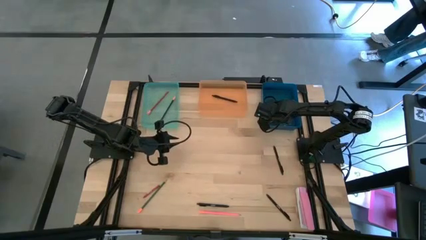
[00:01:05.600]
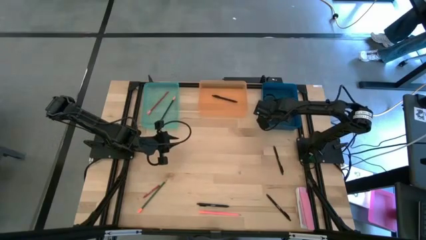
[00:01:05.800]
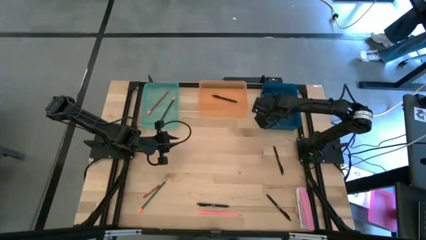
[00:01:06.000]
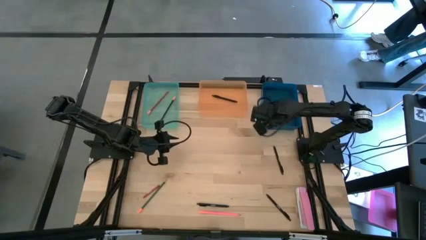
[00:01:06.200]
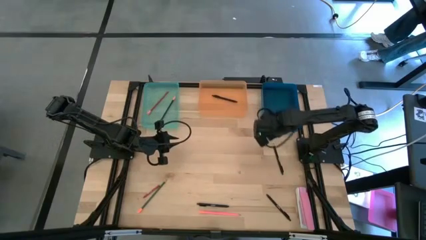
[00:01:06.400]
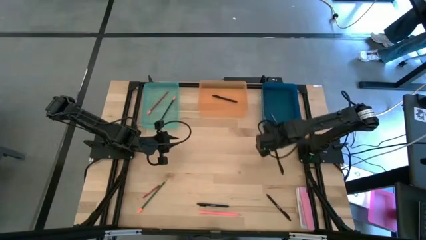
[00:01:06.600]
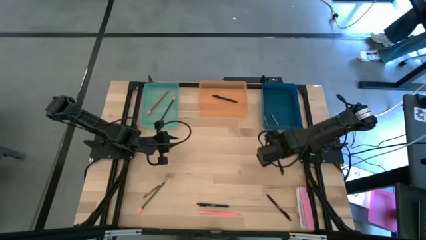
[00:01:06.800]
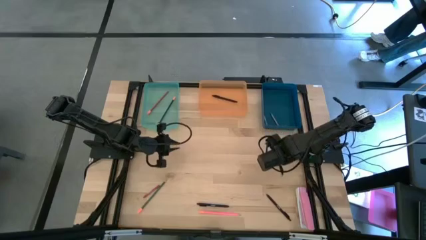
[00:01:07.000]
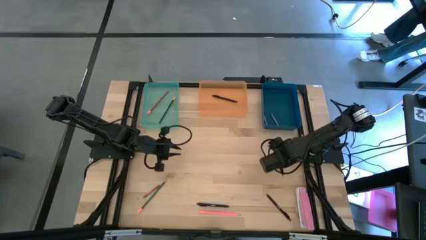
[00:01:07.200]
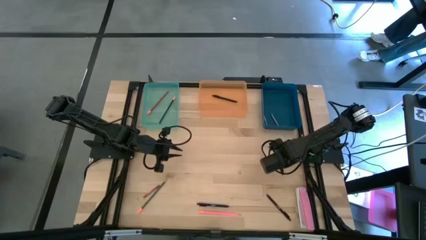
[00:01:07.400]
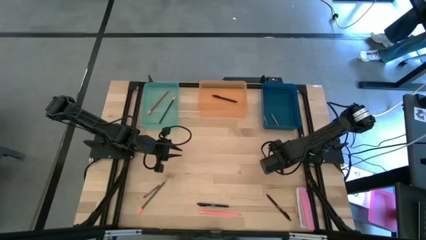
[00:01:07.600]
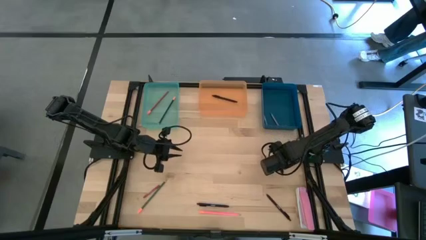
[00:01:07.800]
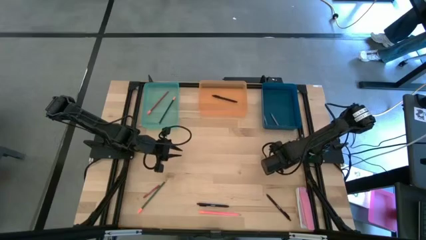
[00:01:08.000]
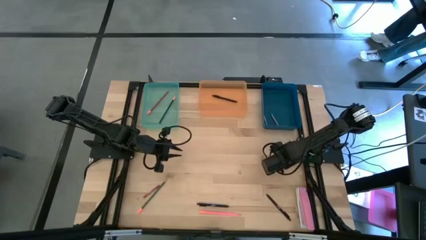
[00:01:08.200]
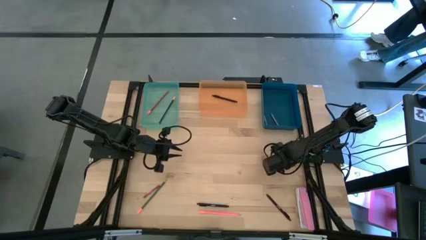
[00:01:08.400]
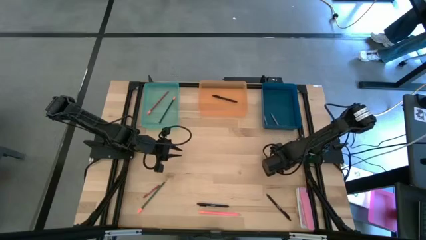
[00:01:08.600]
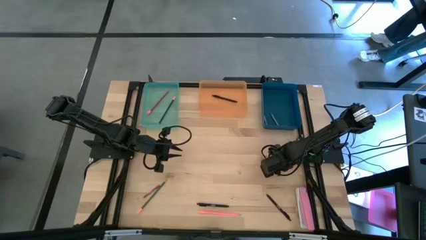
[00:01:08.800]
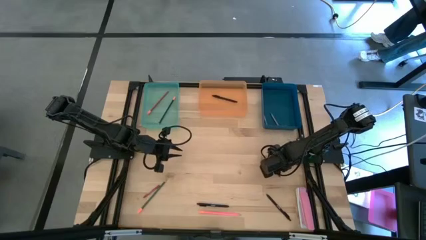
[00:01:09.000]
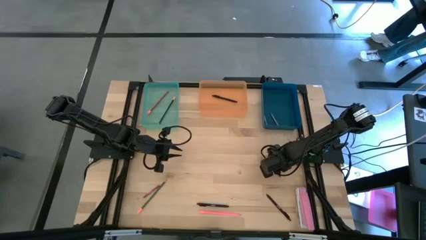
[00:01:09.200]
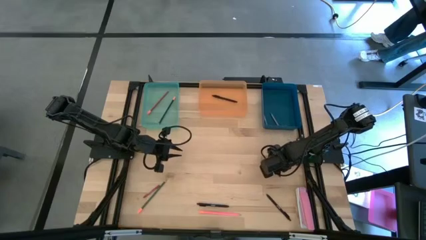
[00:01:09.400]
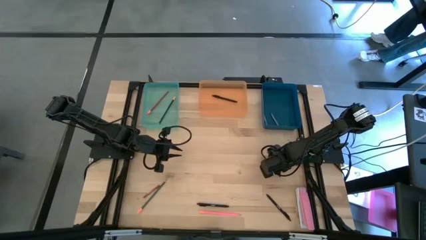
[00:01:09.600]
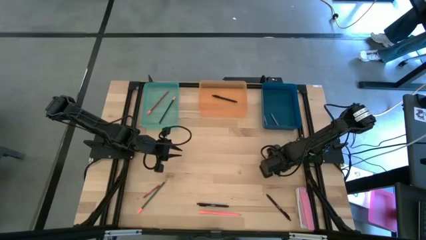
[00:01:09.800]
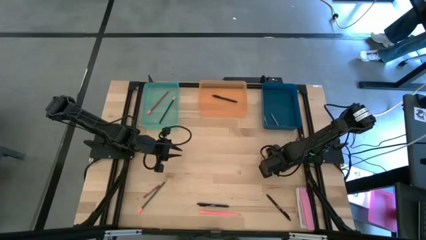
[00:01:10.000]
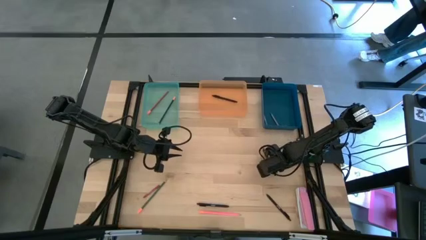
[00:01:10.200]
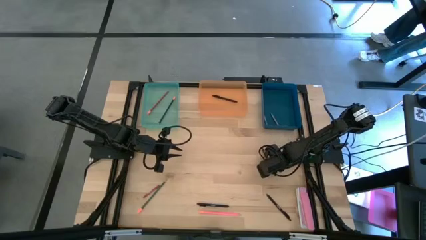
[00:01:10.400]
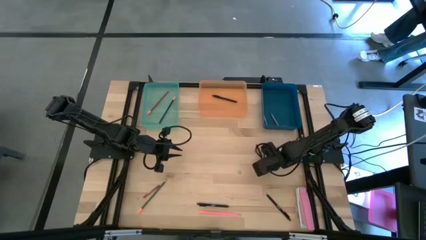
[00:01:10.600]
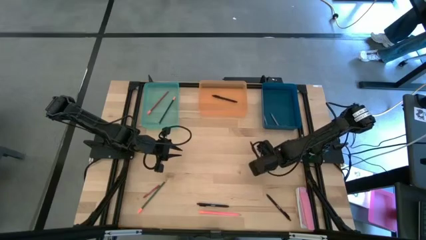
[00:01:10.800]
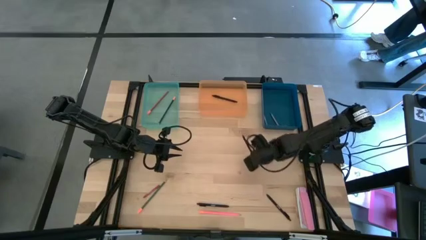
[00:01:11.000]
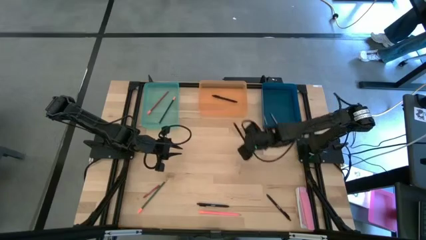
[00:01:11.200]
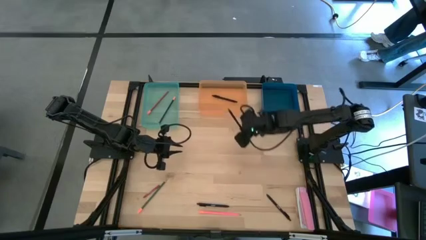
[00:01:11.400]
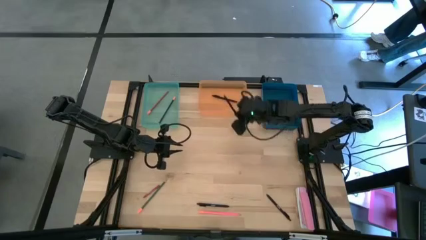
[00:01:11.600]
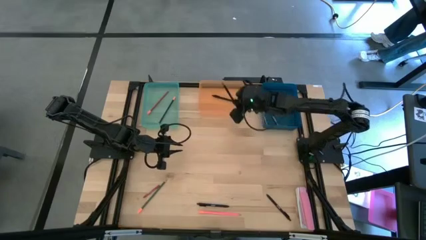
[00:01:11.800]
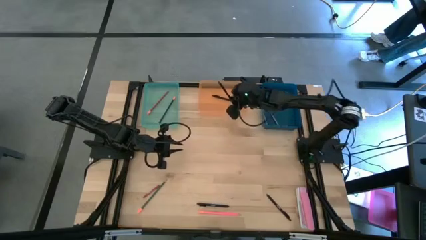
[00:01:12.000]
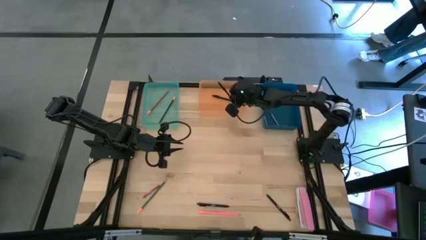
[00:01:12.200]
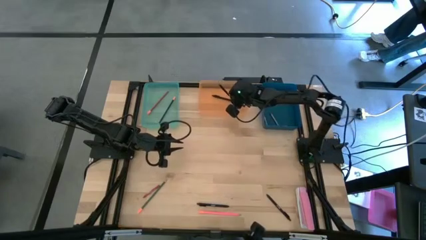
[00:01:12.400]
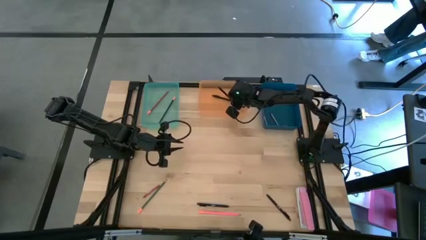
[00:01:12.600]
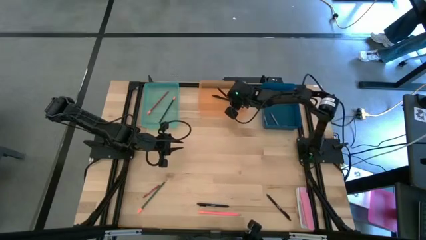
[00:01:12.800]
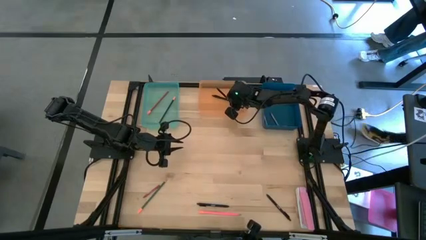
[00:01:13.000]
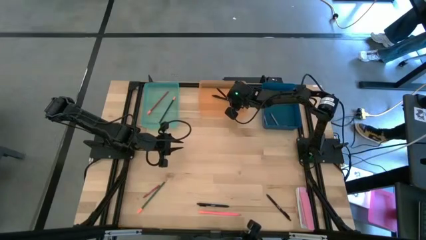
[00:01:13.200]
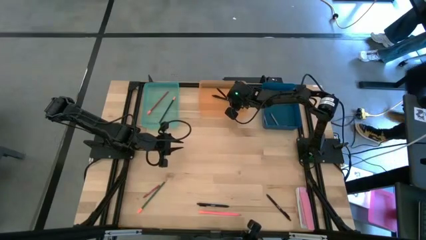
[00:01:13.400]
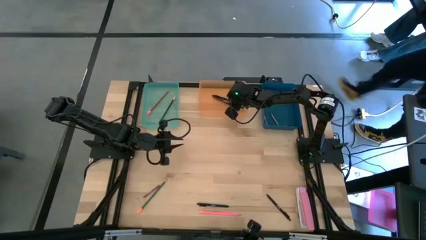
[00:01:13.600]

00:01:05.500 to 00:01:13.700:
Task: Sort crayons/erasers/pens/pencils in bins
Put the black pen into the orange bin

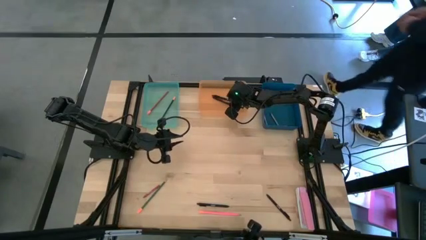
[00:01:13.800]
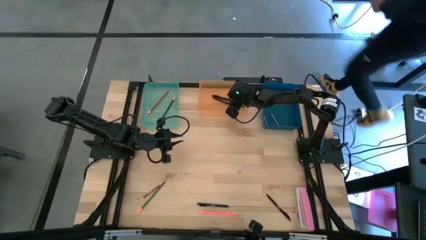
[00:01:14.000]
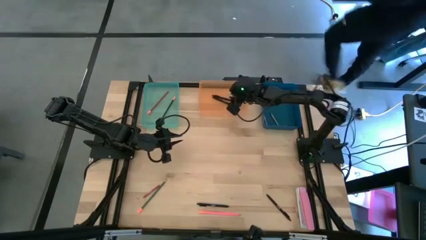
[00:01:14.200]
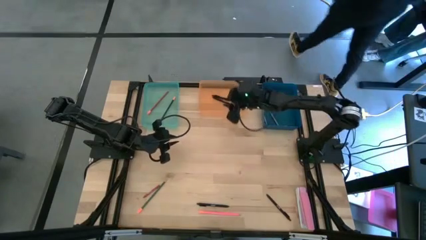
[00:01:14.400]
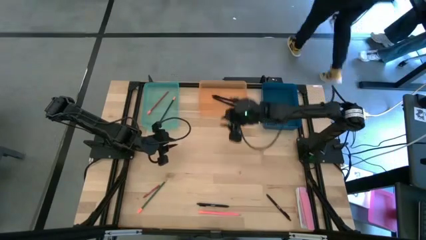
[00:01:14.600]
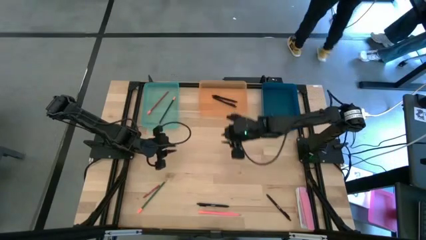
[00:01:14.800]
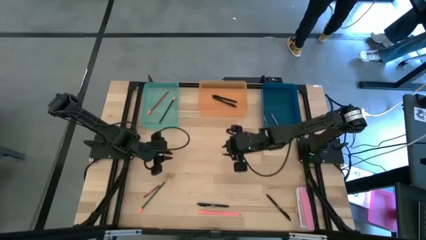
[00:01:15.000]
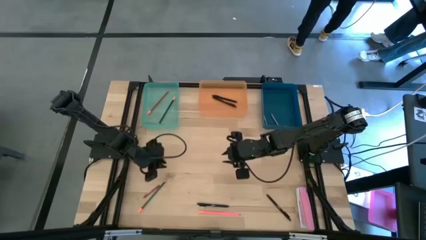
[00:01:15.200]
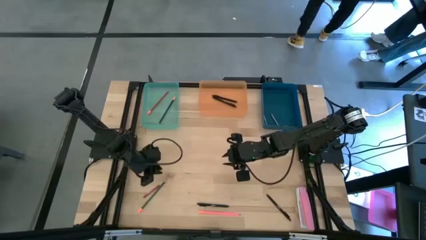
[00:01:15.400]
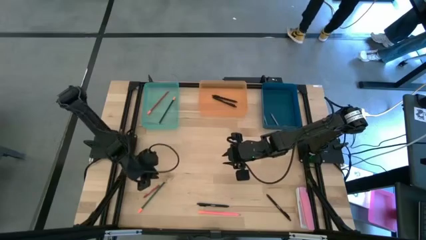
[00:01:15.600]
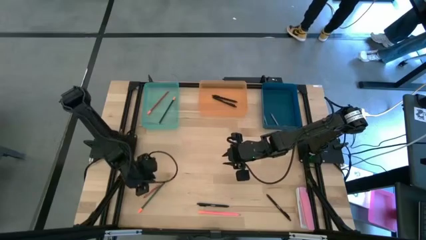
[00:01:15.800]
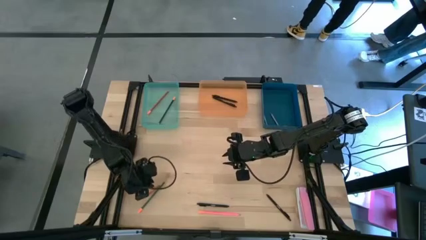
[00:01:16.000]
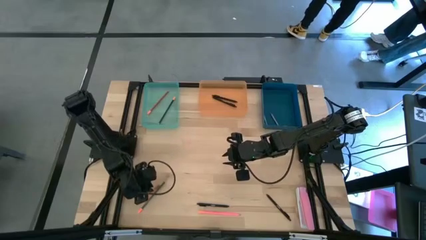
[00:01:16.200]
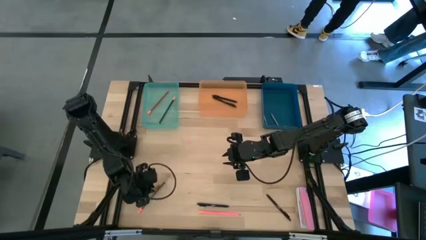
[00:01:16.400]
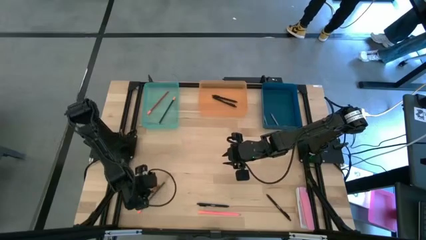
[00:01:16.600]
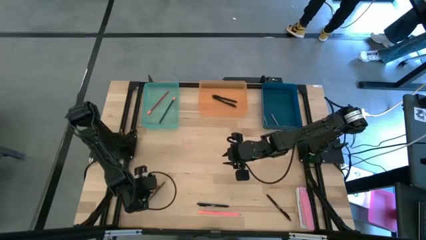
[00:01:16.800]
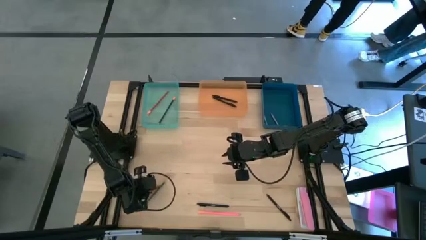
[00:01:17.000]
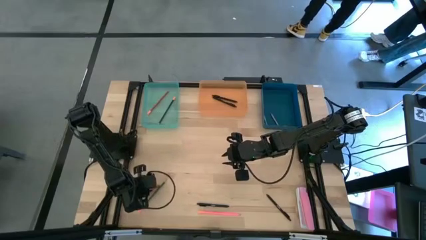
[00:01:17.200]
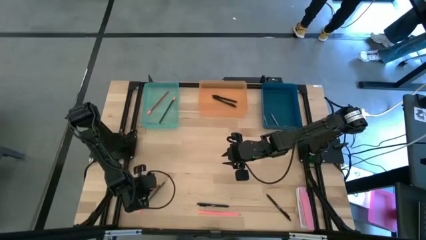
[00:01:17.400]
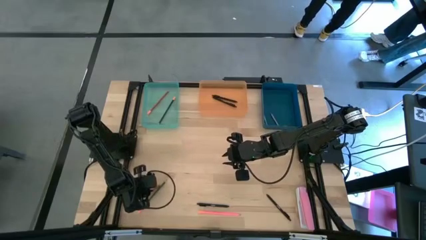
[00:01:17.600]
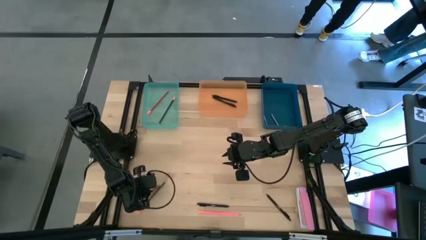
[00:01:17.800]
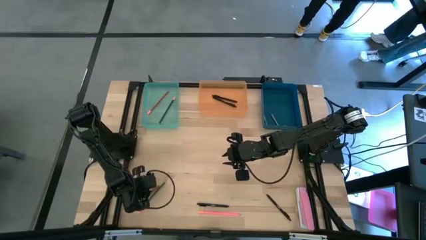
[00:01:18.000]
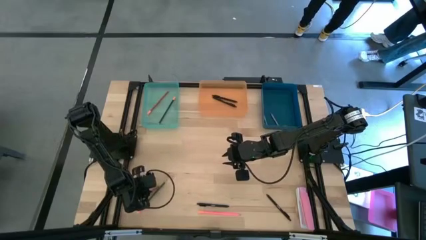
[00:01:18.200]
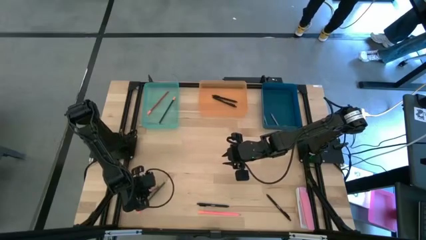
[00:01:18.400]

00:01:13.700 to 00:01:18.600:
Put the red crayon into the blue bin

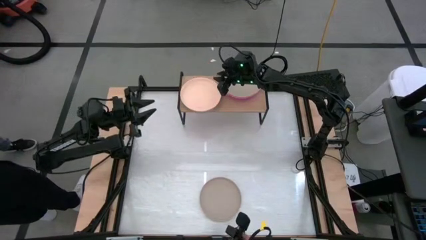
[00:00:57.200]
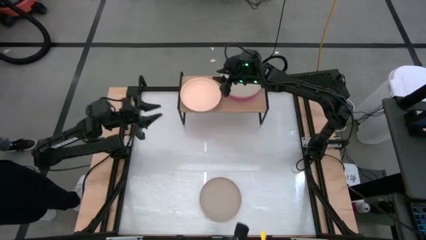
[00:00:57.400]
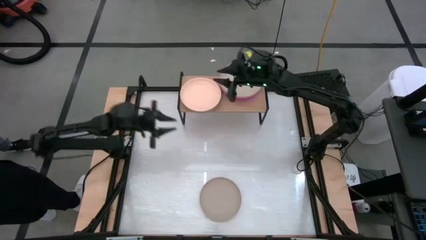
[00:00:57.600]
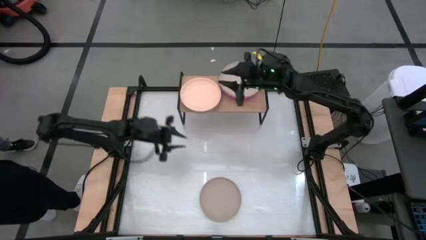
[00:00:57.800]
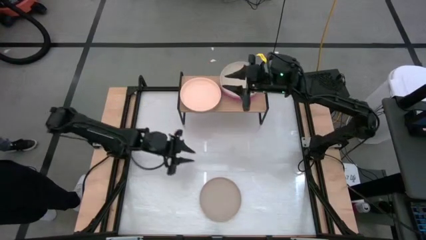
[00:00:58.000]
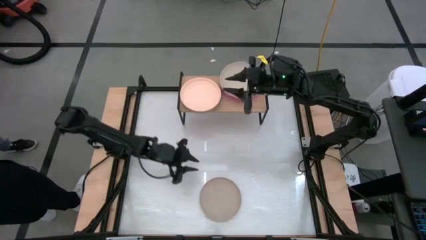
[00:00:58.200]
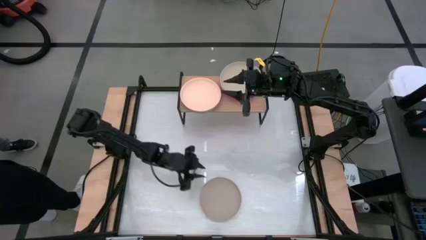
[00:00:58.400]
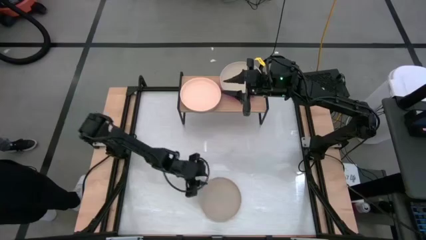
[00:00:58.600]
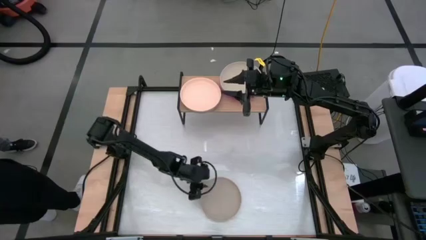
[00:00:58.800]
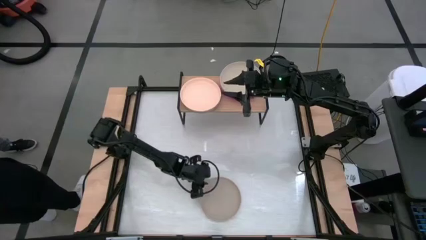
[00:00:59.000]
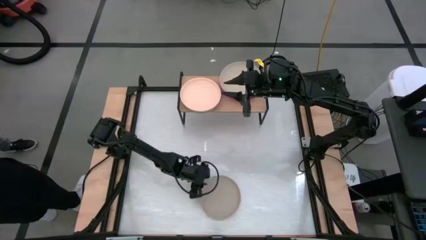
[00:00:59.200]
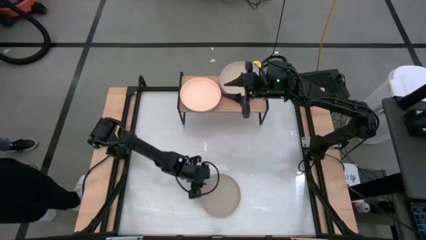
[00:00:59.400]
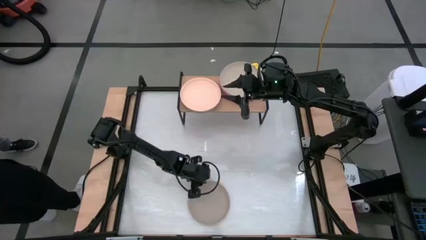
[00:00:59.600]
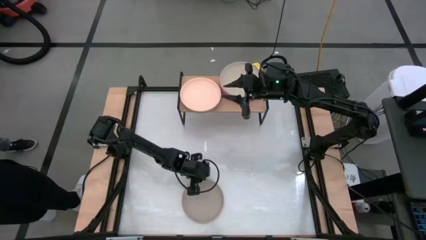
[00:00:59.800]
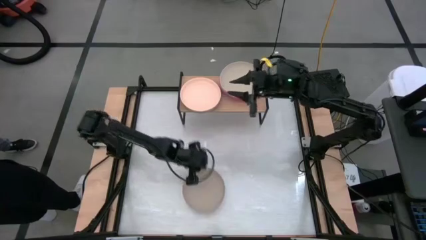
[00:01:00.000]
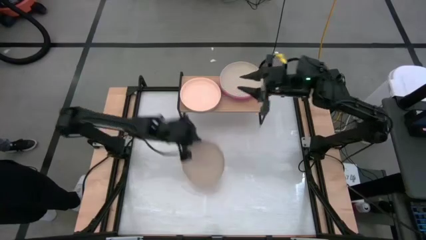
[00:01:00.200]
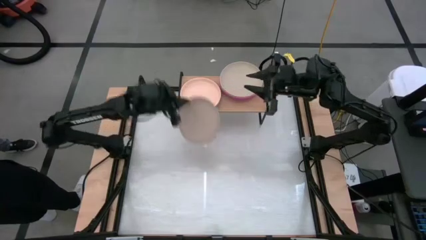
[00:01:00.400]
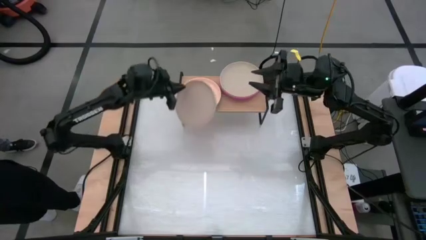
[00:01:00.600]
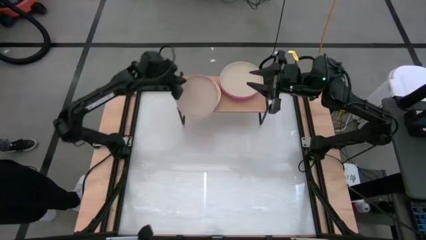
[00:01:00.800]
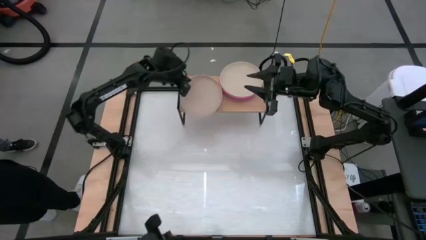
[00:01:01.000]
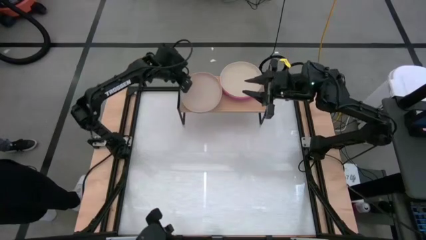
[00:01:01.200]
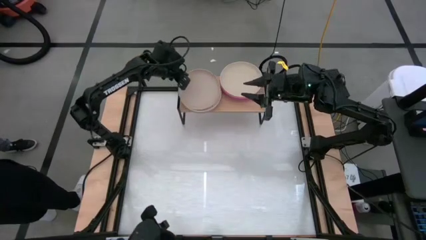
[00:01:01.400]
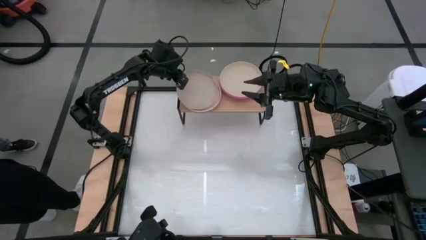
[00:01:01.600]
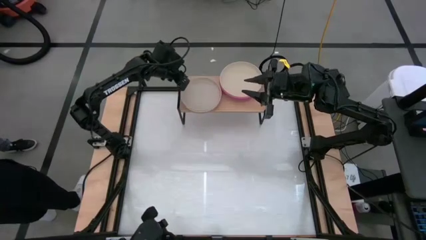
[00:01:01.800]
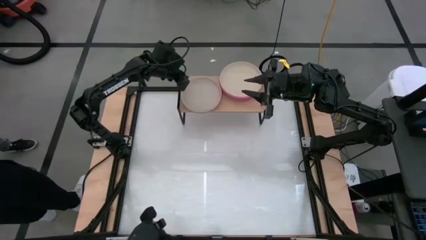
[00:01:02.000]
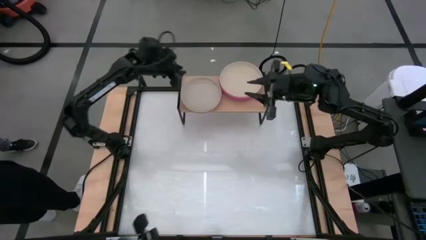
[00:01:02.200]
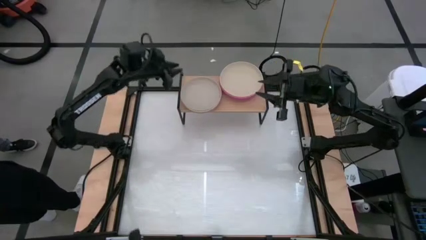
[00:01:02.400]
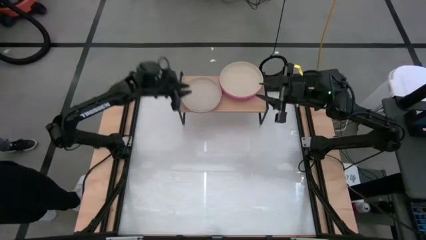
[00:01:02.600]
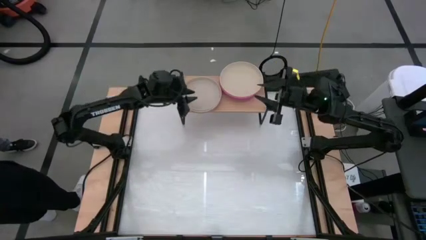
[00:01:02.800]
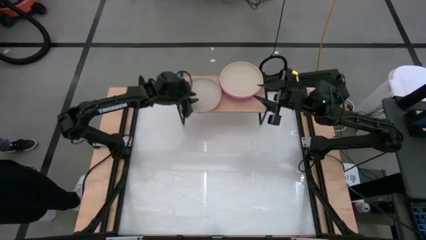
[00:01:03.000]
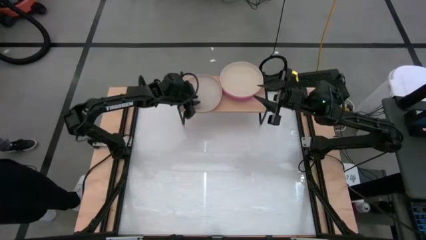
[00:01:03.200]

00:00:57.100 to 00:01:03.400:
Task: Place and stack plates onto a shelf
Stack the gray plate on top of the light yellow plate on the shelf
